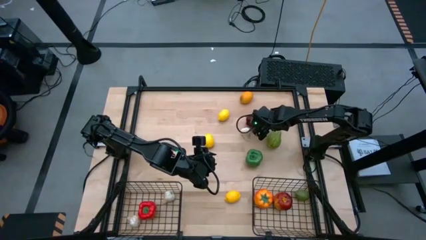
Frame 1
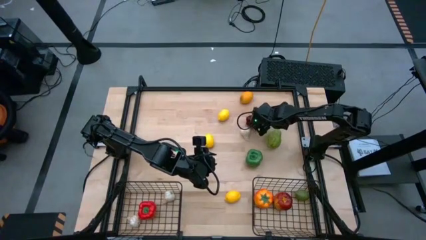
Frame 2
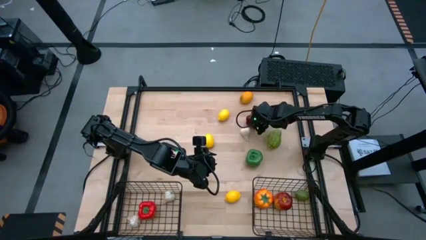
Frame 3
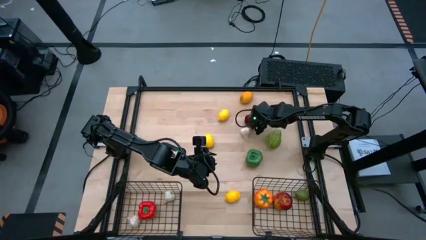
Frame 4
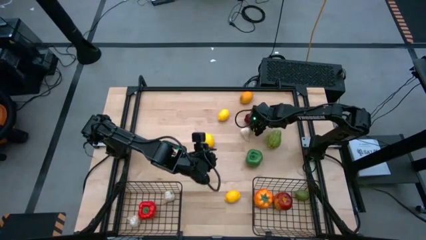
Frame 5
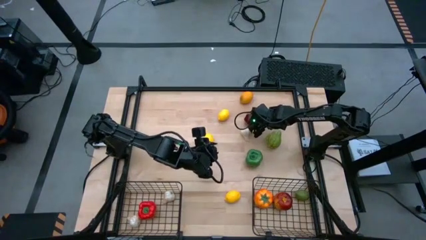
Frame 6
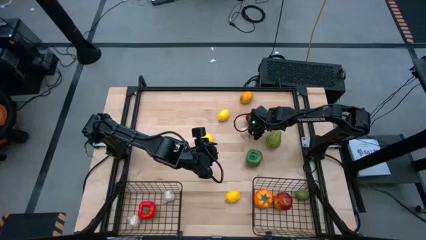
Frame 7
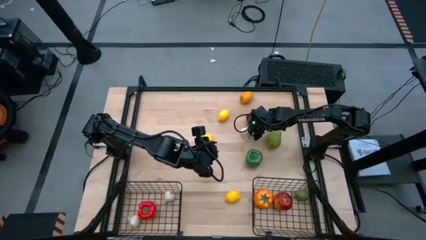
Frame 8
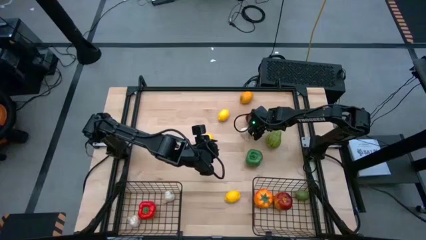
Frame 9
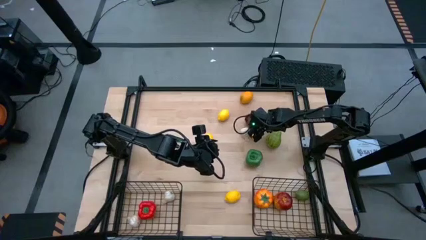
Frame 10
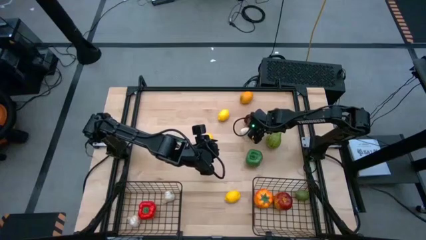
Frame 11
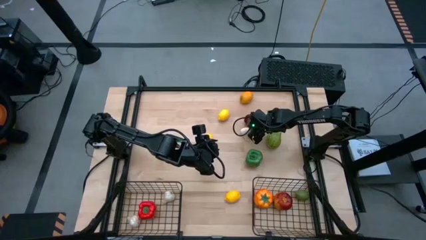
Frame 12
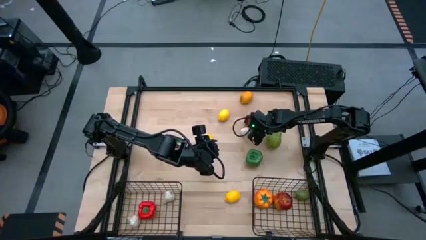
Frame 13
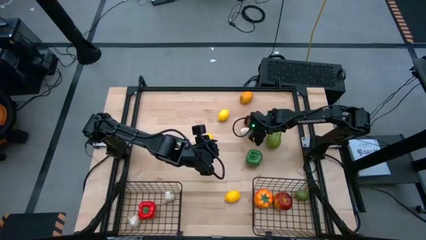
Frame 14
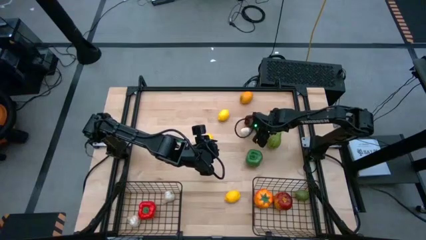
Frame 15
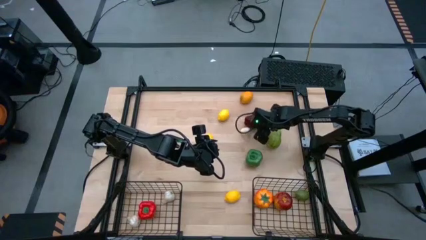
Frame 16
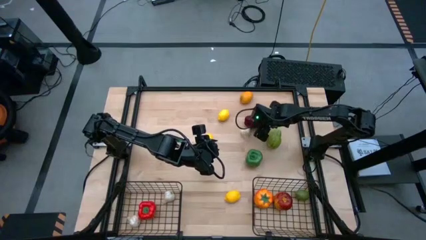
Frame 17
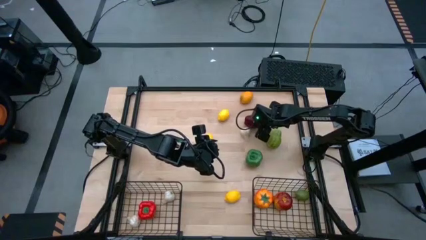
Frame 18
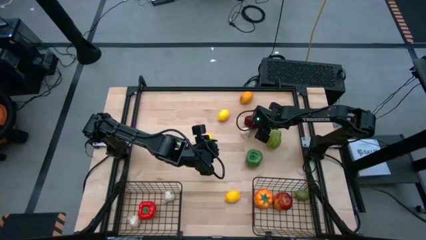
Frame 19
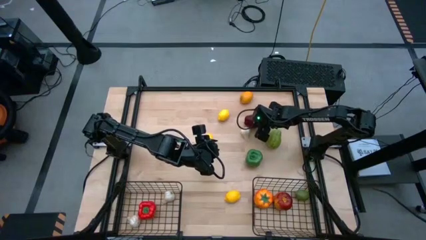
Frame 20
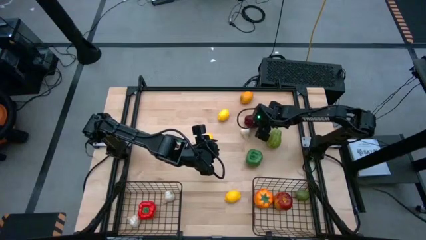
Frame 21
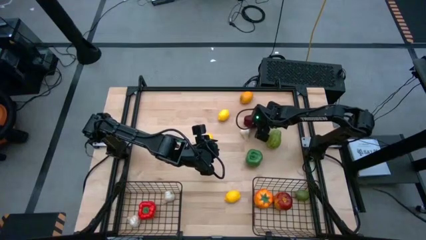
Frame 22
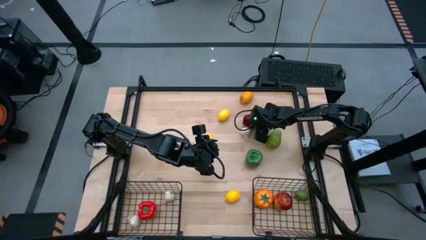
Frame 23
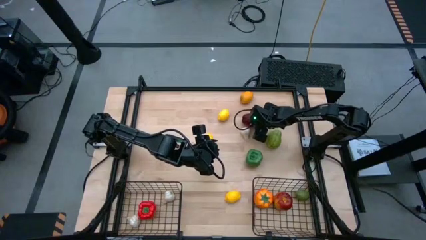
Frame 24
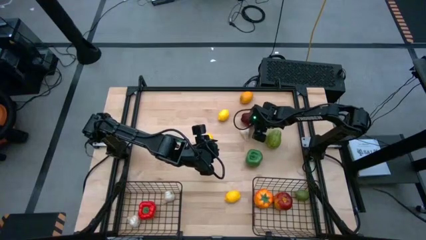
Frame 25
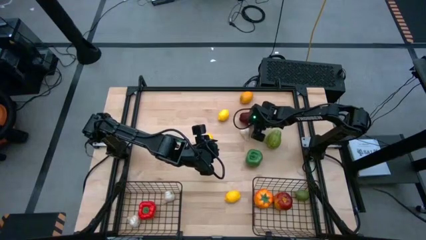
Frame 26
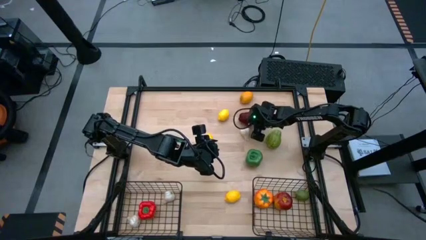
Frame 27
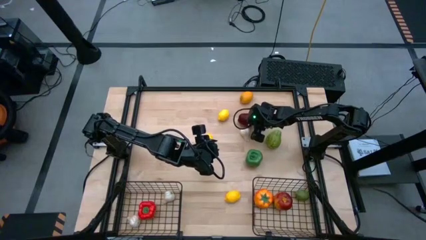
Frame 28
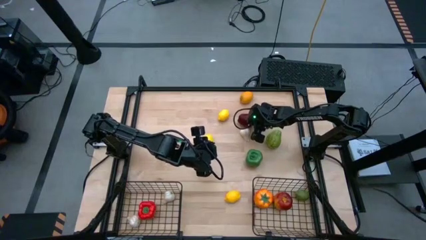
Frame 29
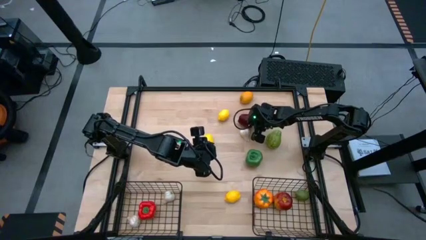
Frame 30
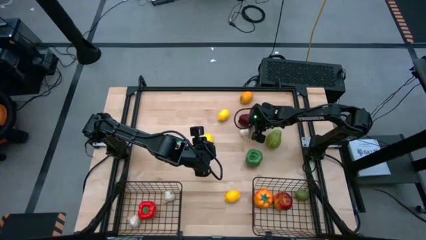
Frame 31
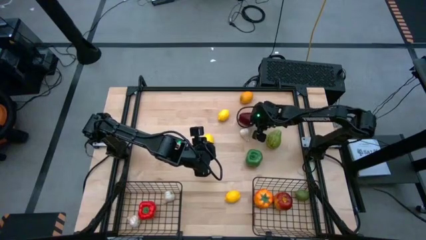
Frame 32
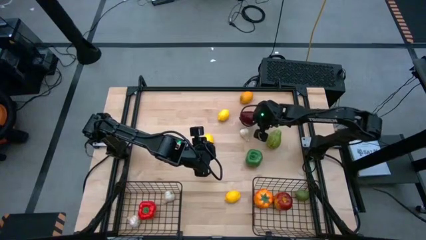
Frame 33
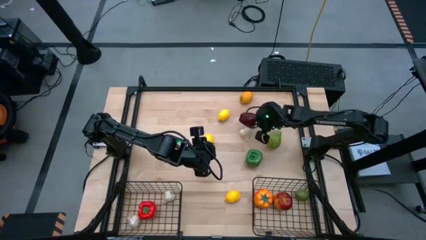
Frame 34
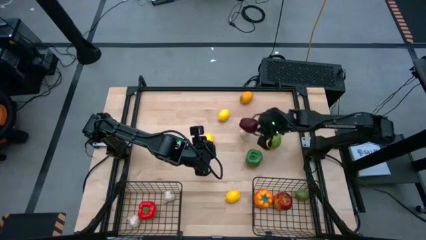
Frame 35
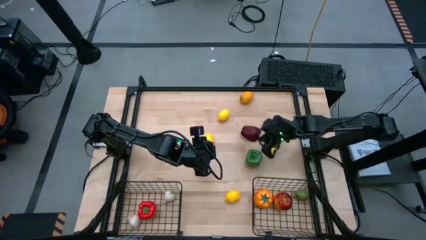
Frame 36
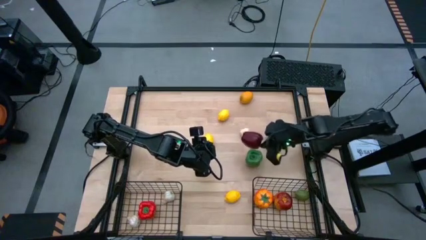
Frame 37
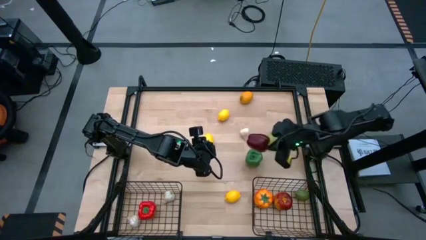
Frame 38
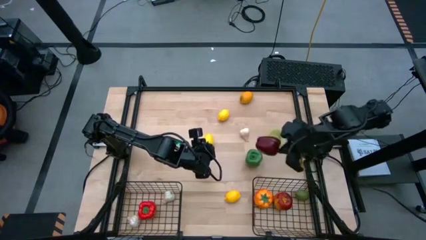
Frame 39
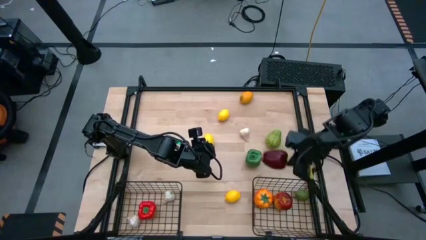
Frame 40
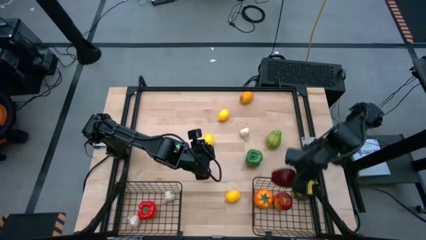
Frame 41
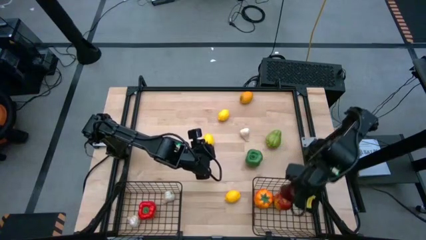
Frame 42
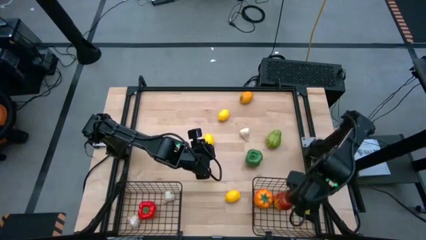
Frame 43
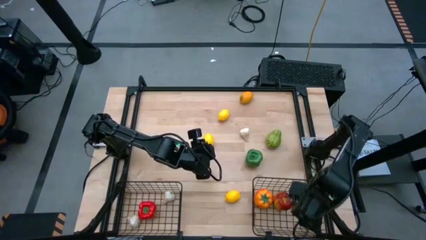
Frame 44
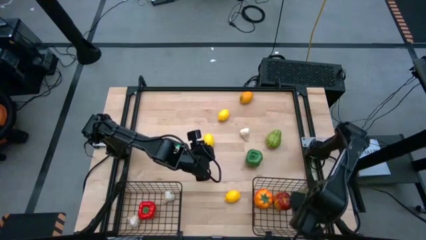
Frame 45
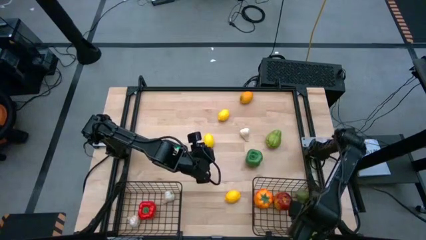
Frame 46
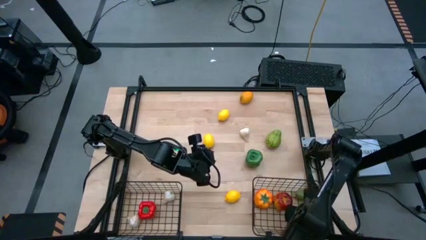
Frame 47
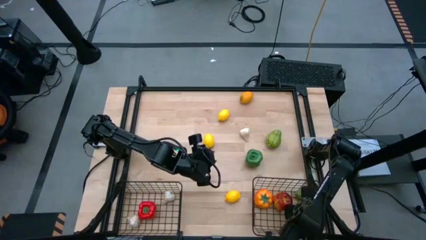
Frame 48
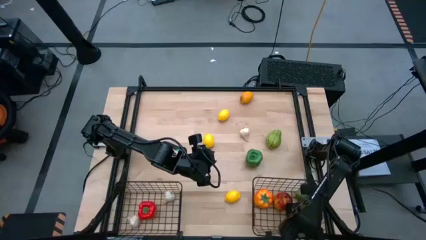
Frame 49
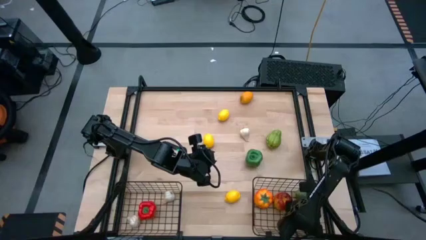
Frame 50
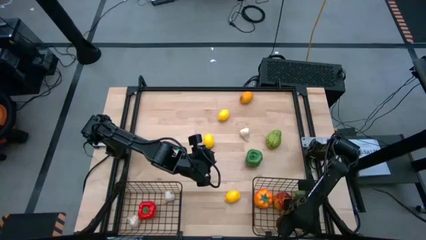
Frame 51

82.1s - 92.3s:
Task: Sort produce into baskets
Put the red apple into the right black wire basket
